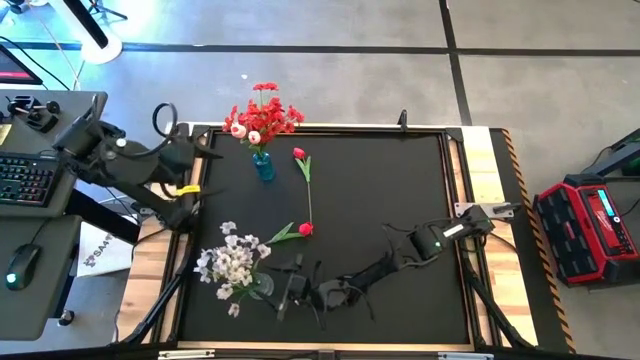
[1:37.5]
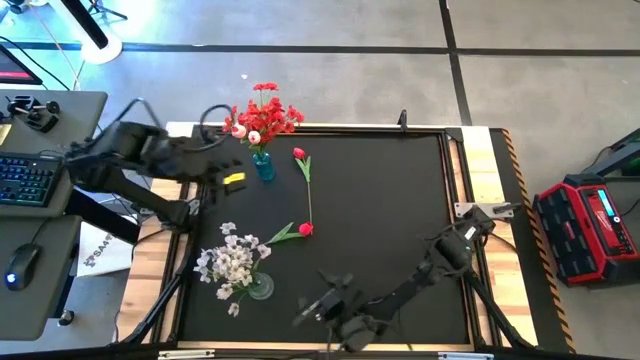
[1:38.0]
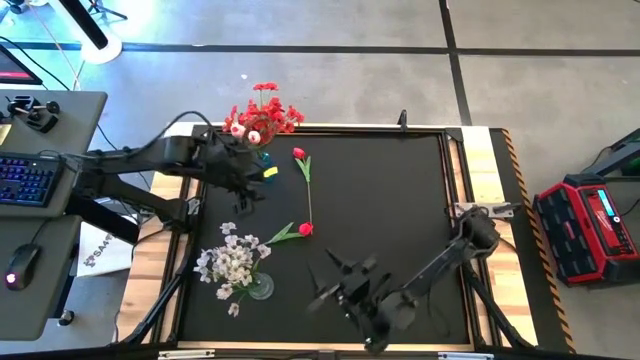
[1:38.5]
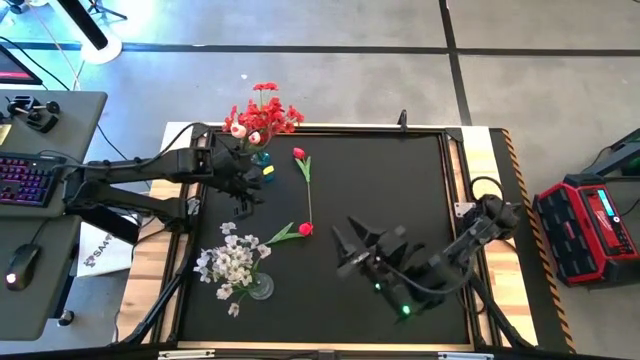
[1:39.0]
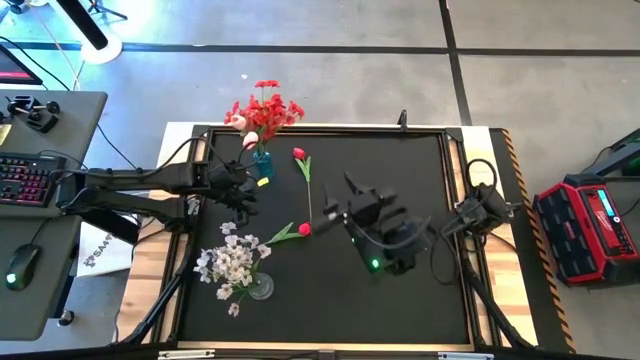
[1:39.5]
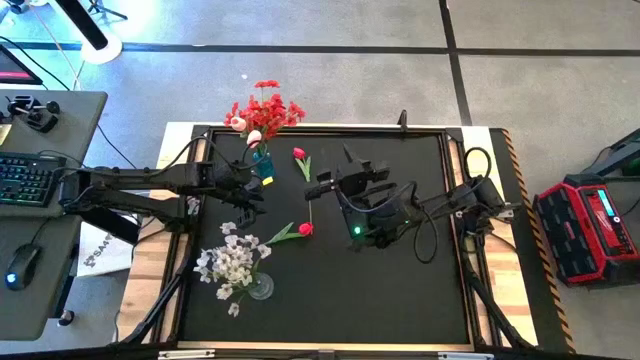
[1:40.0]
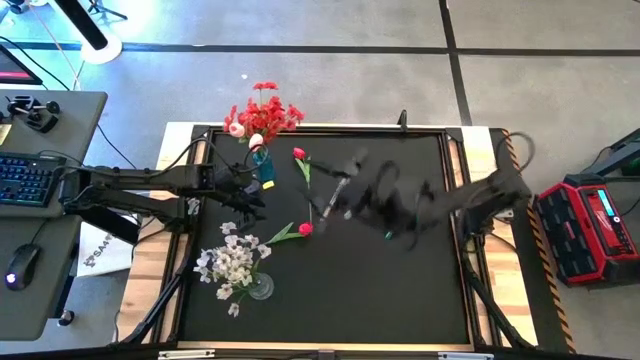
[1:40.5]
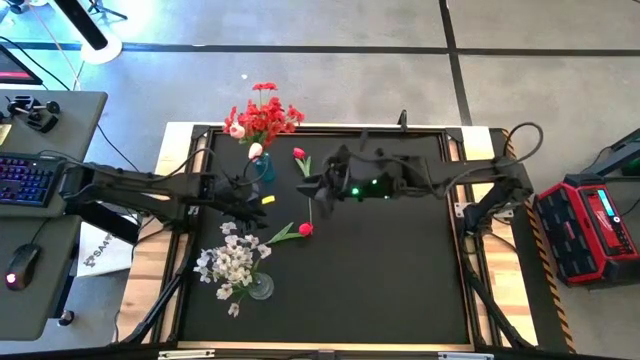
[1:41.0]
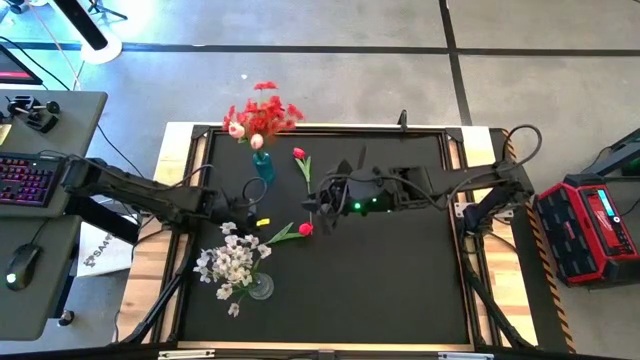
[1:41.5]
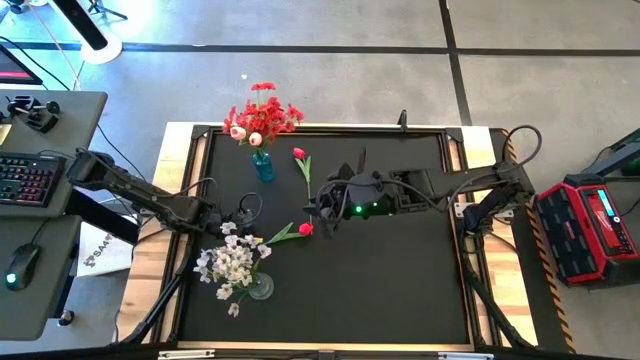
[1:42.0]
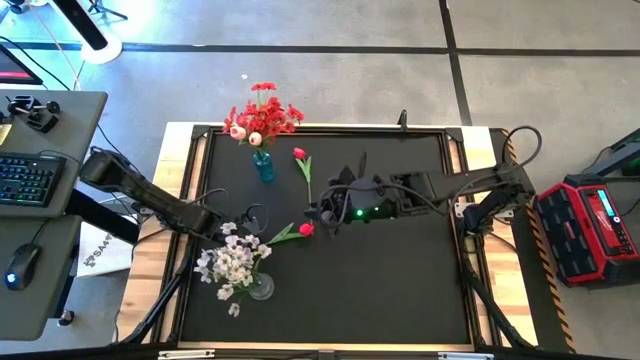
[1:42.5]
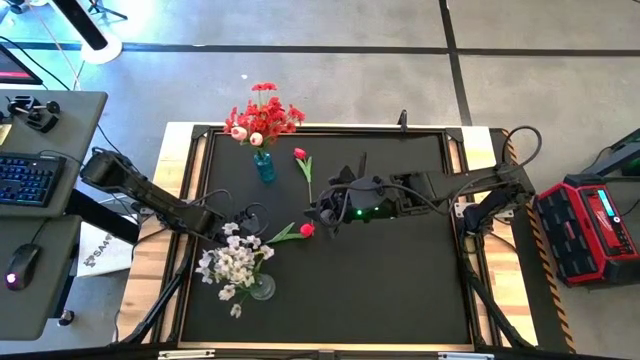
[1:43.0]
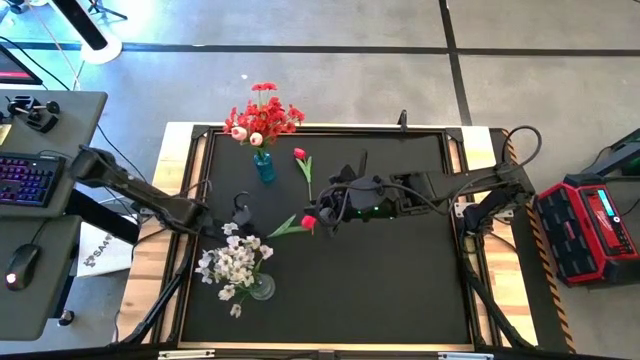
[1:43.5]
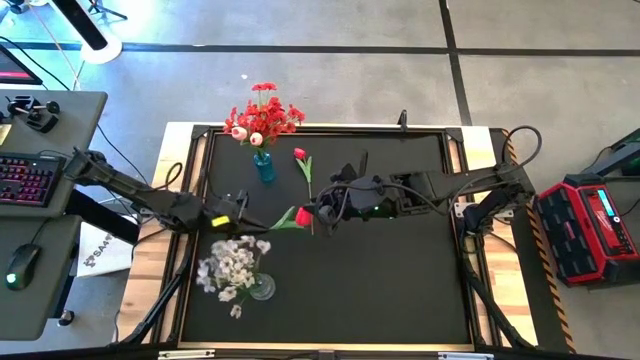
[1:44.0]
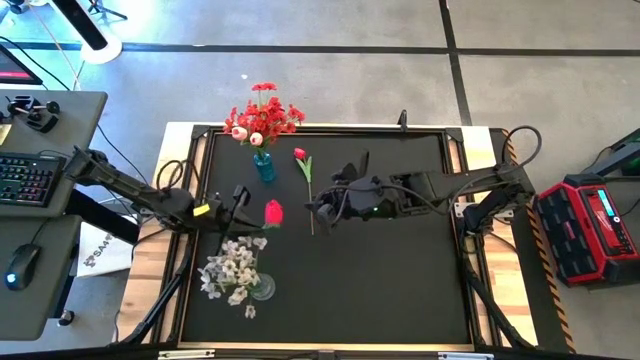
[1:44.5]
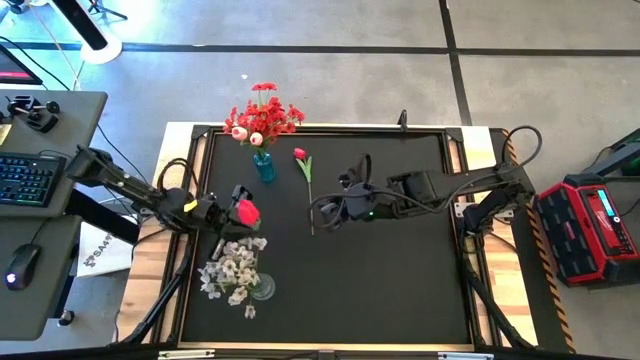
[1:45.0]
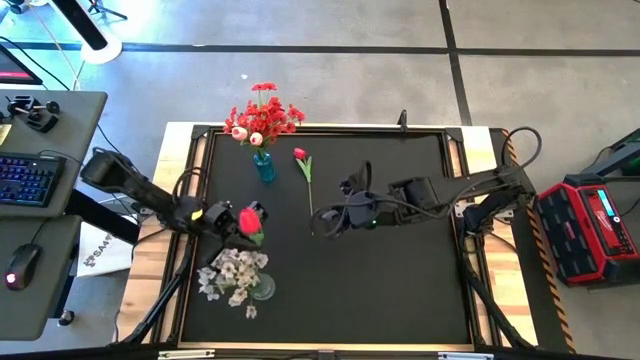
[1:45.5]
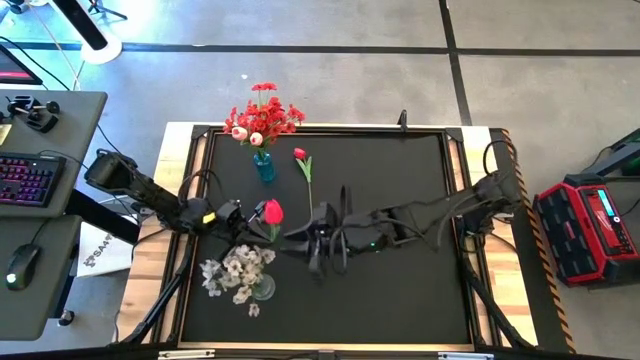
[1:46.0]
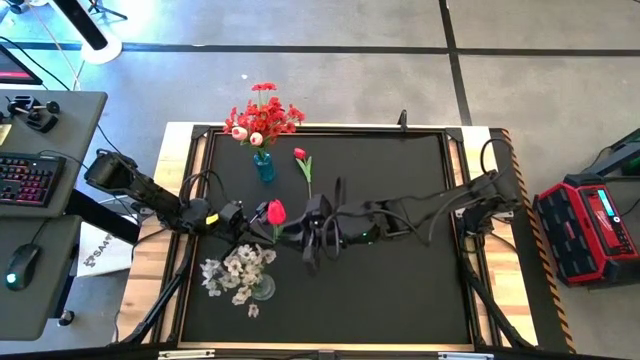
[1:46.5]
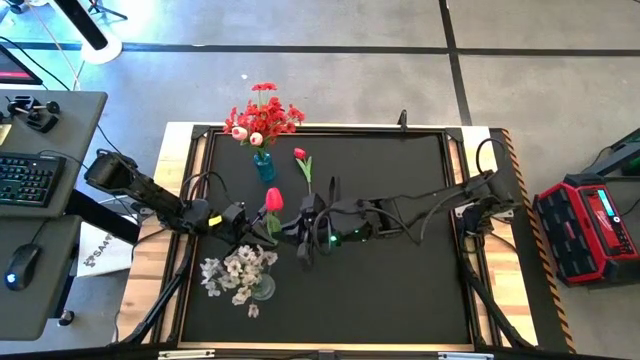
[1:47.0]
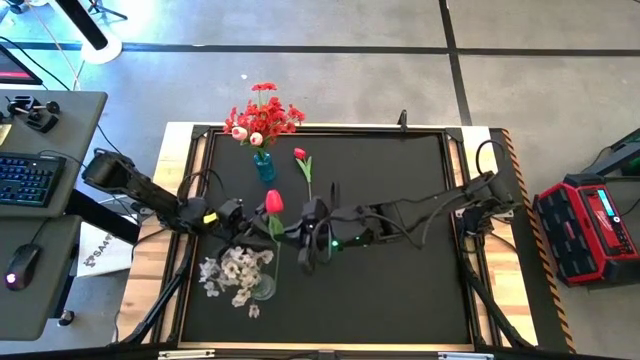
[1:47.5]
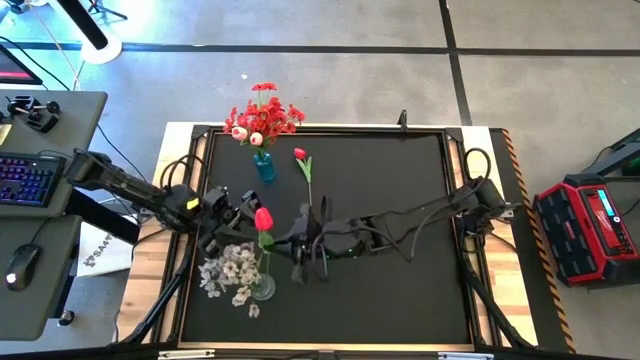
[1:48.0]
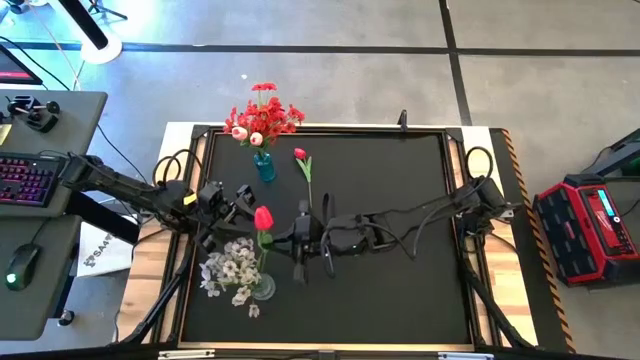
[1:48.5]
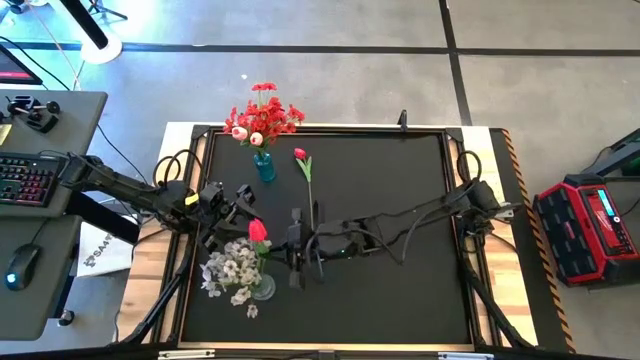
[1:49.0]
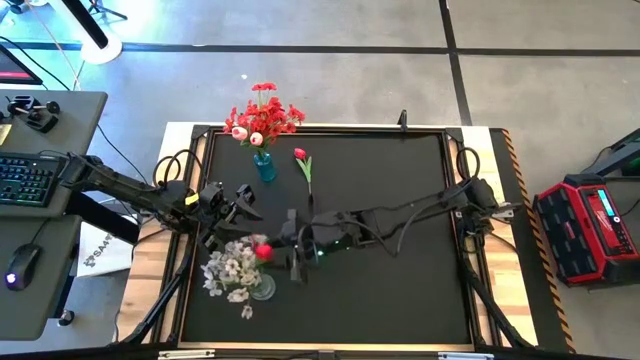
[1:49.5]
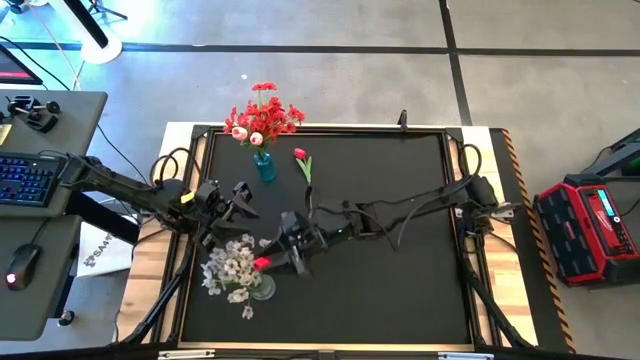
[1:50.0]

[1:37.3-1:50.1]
Task: Sort flowers into vase by color
Put the bottom red flower into the transparent vase

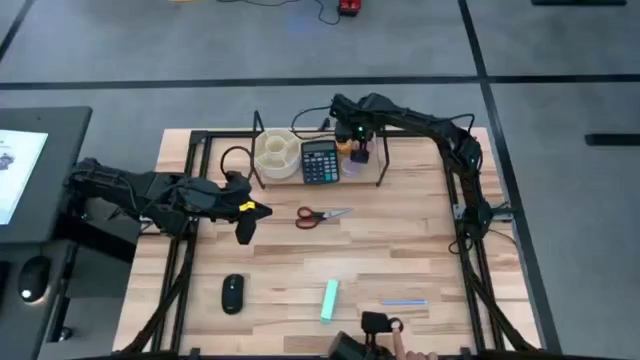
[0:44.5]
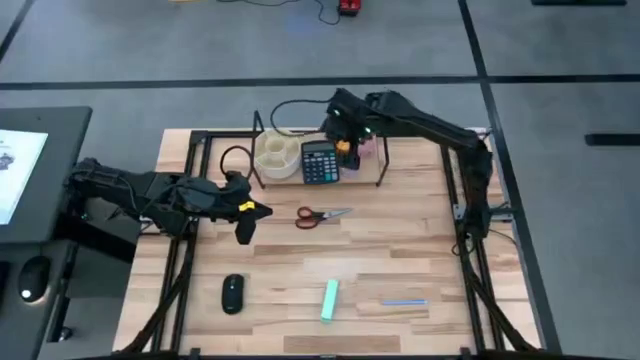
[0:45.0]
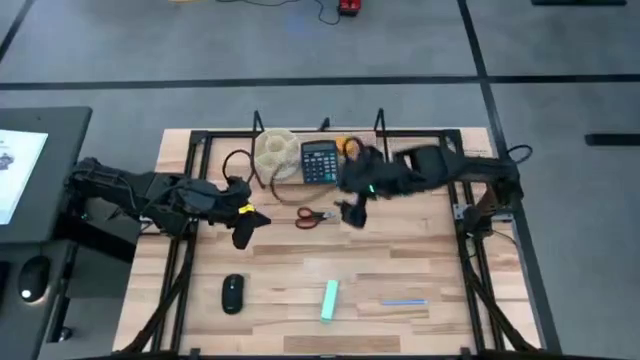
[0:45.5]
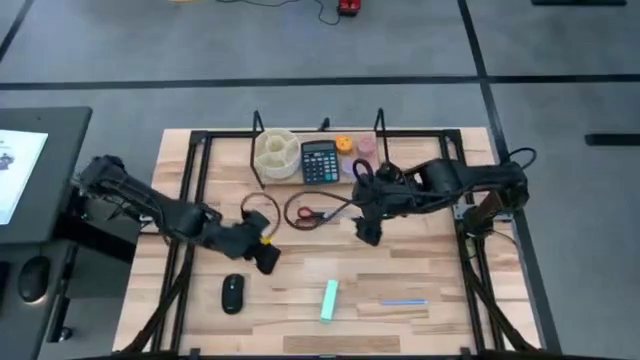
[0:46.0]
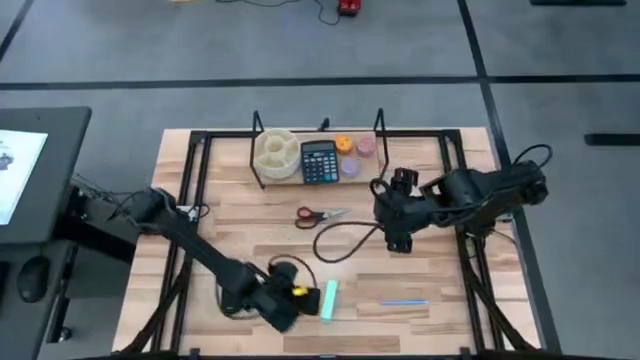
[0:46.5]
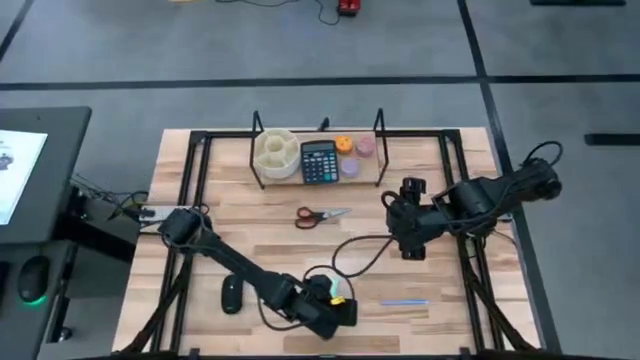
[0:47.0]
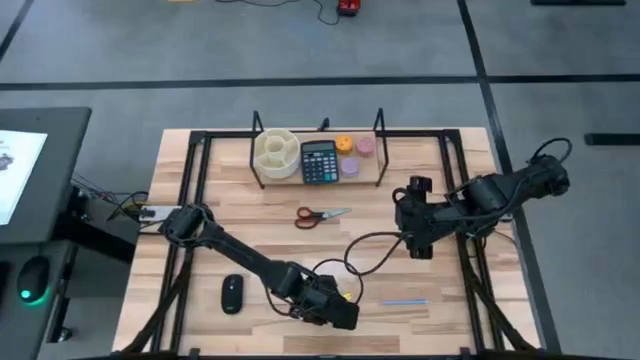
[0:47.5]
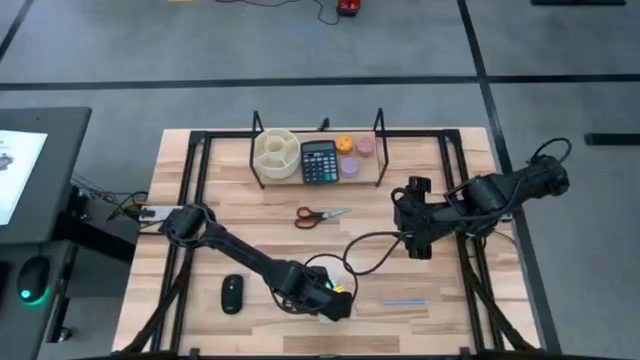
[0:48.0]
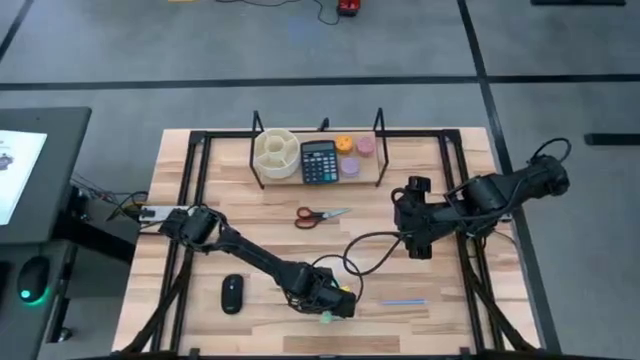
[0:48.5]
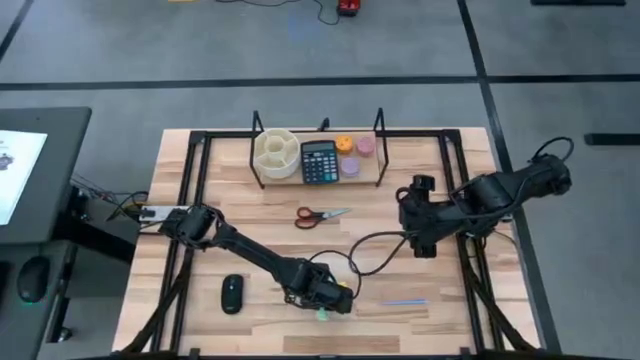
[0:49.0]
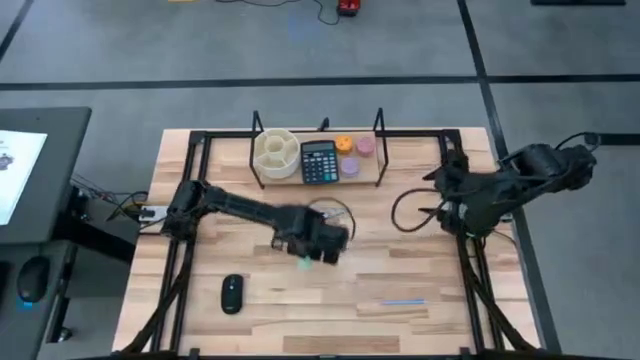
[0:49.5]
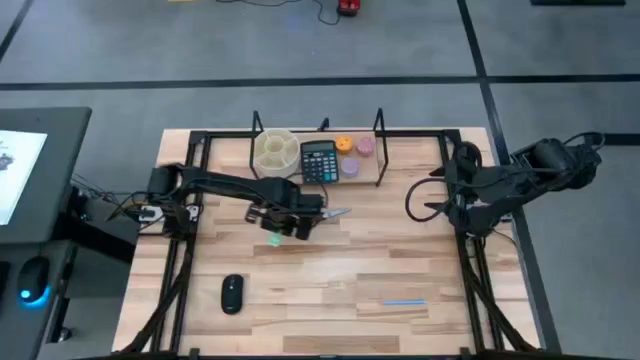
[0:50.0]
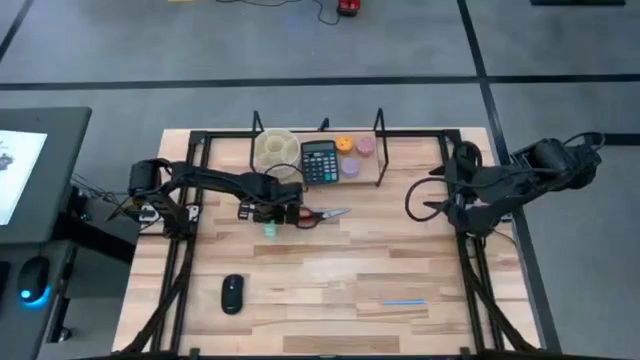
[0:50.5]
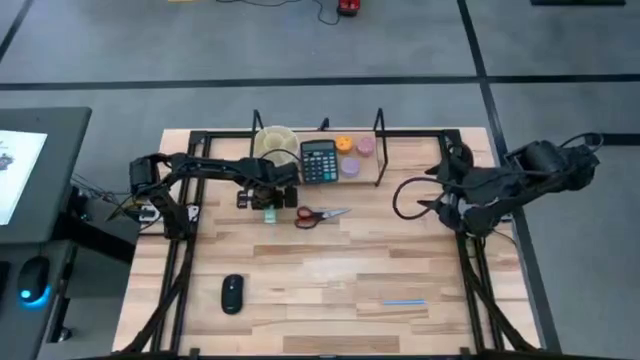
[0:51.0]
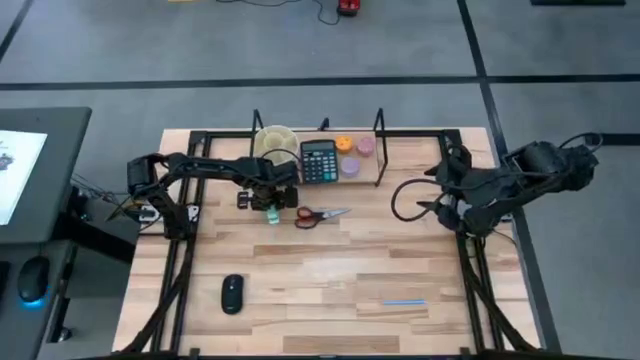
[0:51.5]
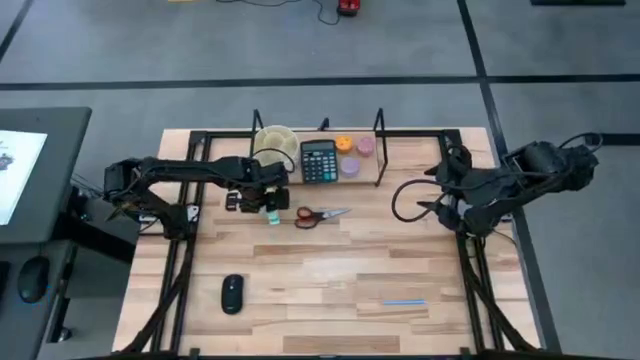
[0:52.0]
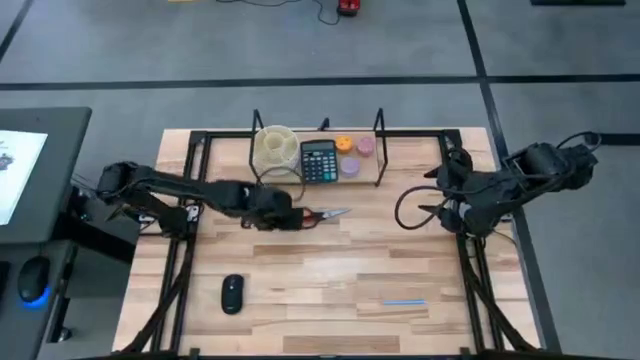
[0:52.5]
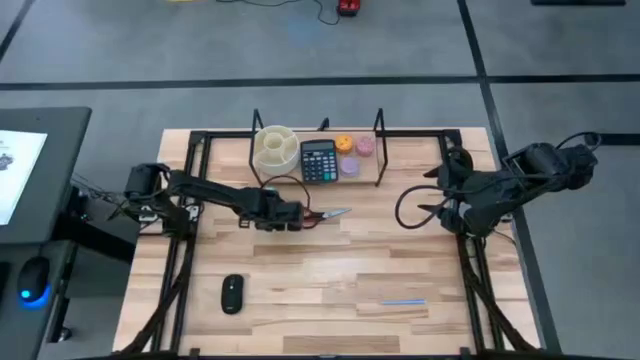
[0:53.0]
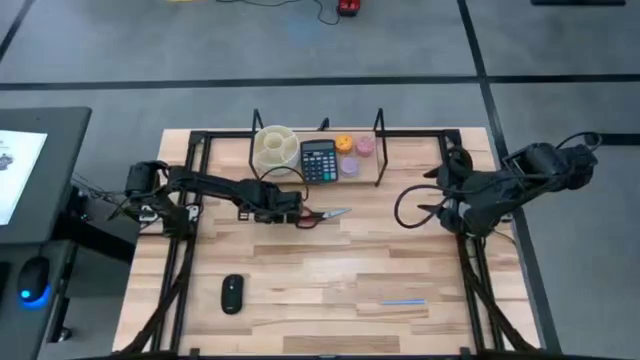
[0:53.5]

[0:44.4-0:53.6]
Task: Stock shelves
Put the light green stapler to the bottom left of the shelf
